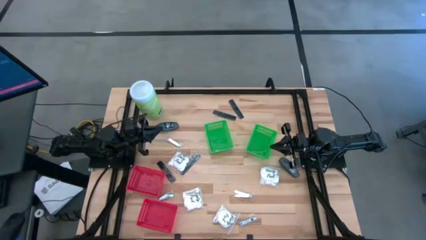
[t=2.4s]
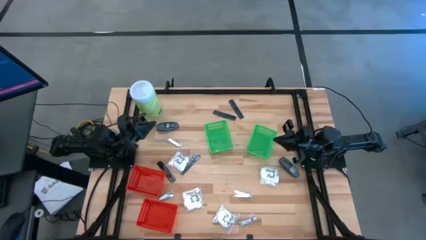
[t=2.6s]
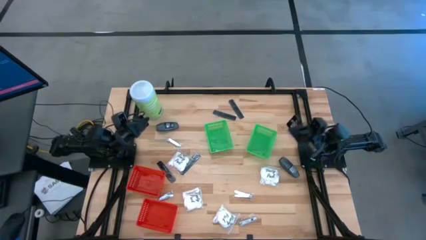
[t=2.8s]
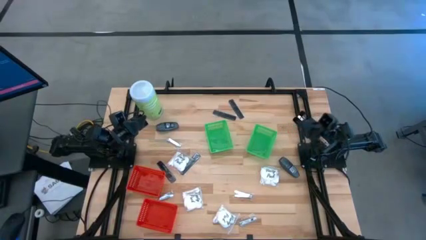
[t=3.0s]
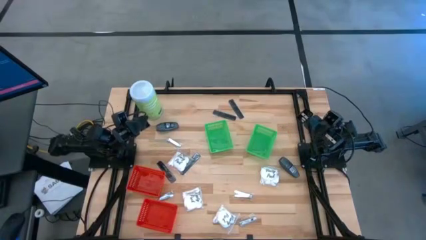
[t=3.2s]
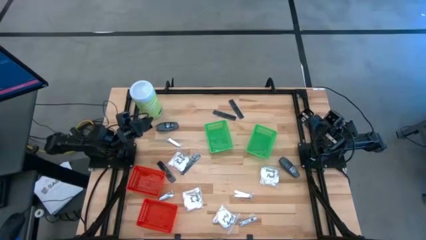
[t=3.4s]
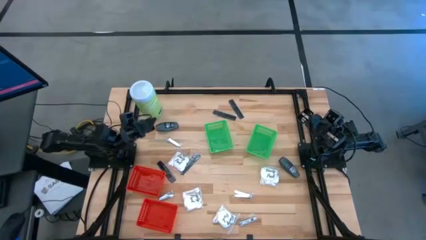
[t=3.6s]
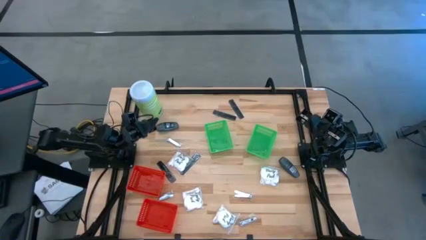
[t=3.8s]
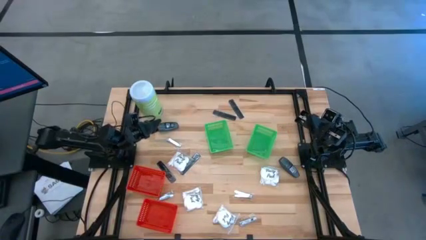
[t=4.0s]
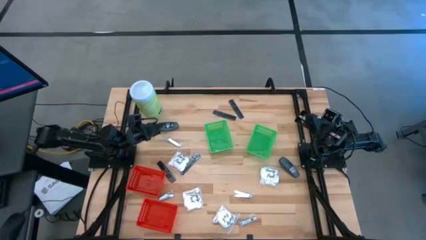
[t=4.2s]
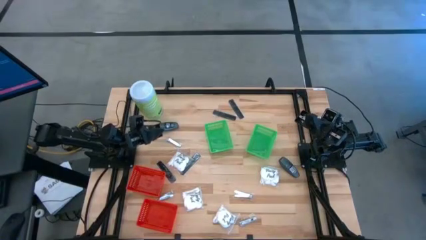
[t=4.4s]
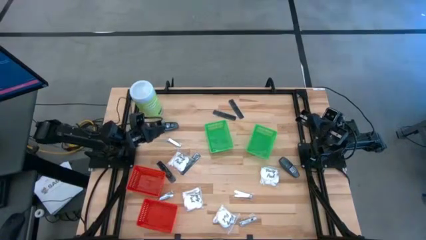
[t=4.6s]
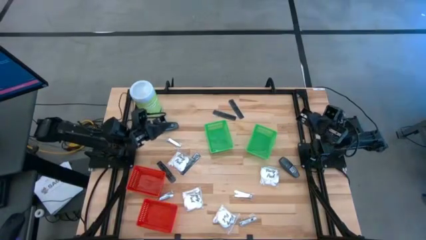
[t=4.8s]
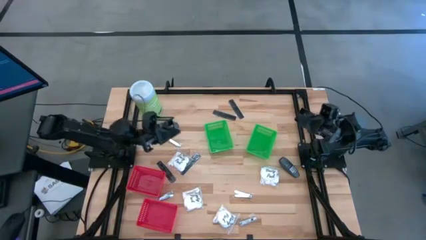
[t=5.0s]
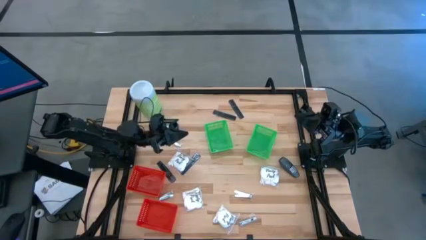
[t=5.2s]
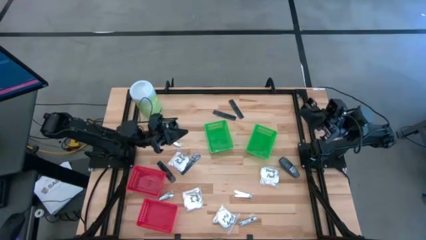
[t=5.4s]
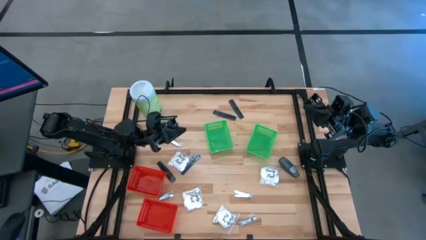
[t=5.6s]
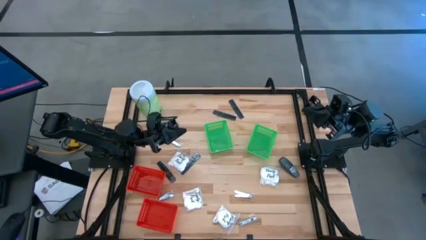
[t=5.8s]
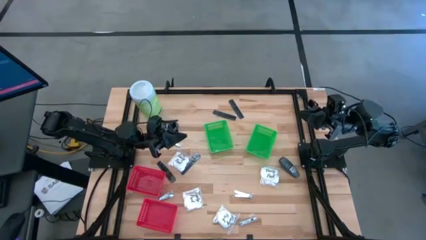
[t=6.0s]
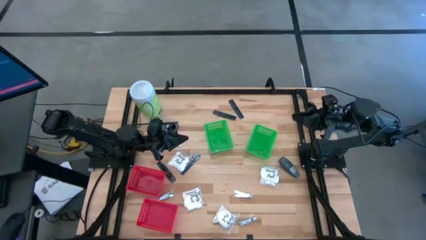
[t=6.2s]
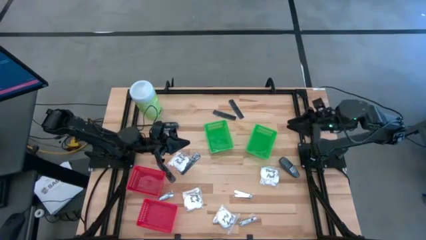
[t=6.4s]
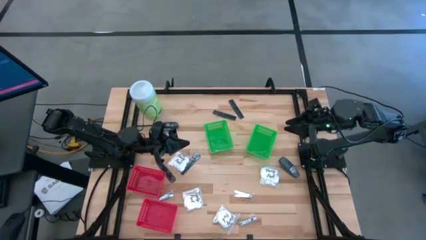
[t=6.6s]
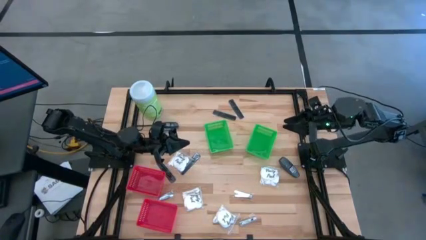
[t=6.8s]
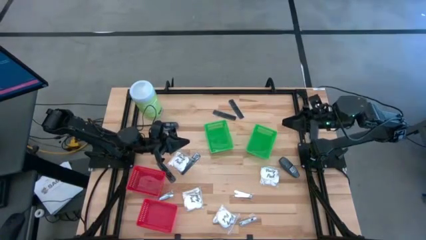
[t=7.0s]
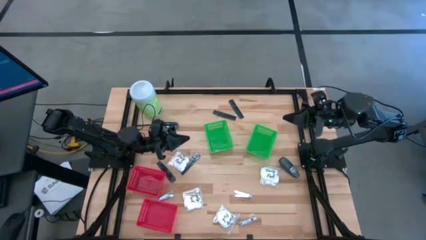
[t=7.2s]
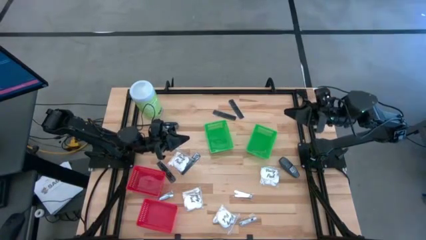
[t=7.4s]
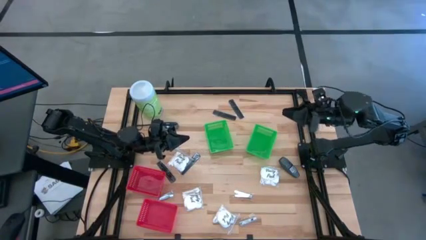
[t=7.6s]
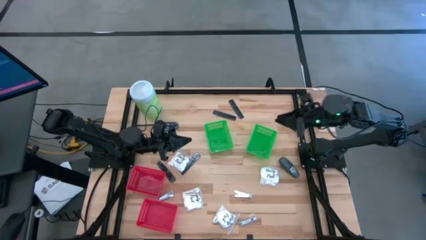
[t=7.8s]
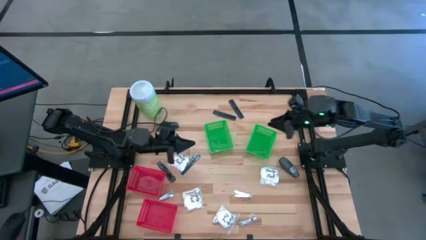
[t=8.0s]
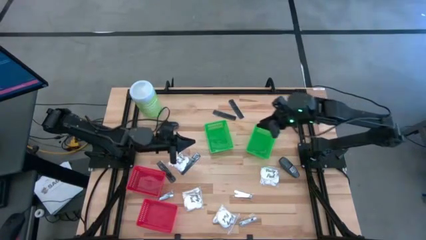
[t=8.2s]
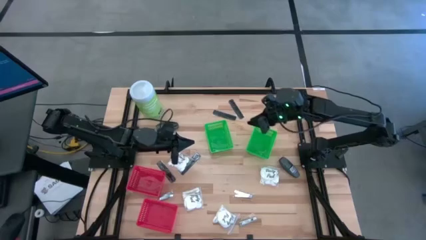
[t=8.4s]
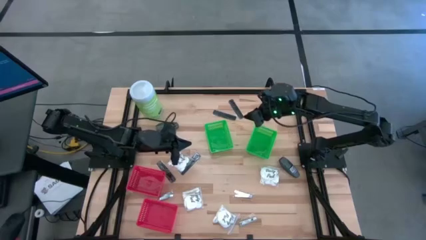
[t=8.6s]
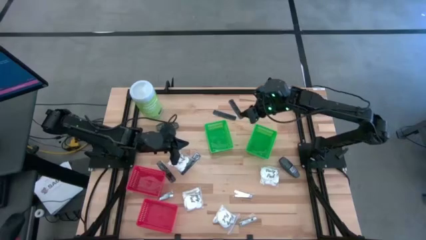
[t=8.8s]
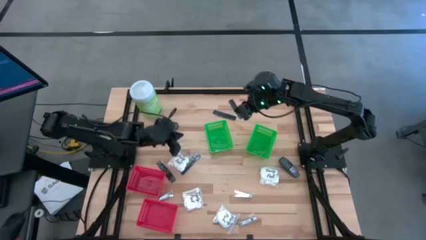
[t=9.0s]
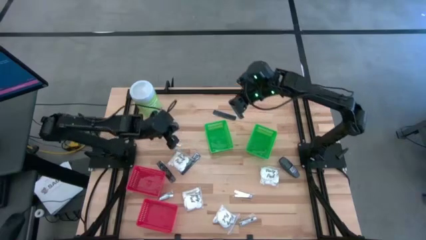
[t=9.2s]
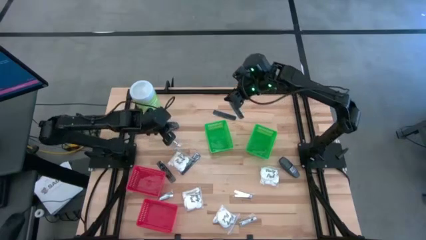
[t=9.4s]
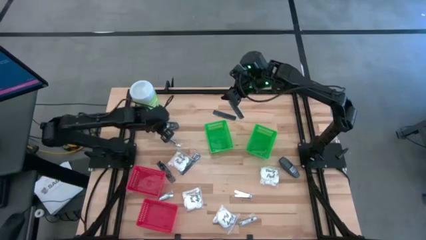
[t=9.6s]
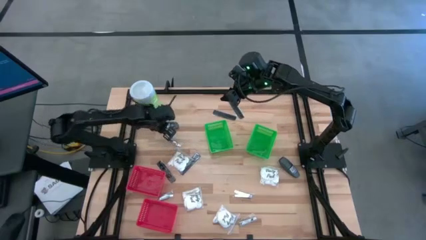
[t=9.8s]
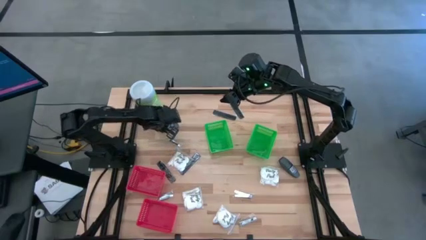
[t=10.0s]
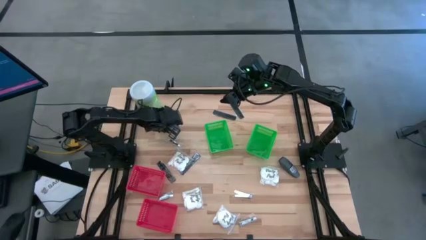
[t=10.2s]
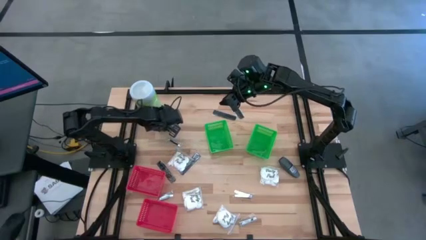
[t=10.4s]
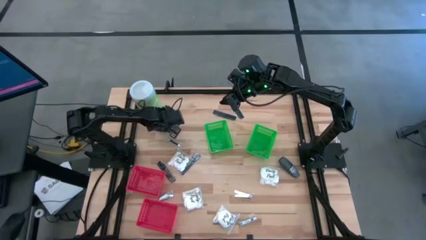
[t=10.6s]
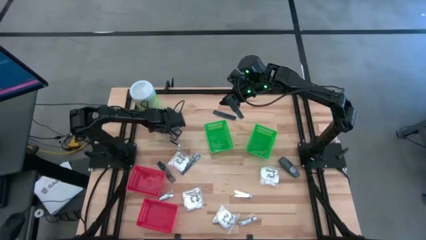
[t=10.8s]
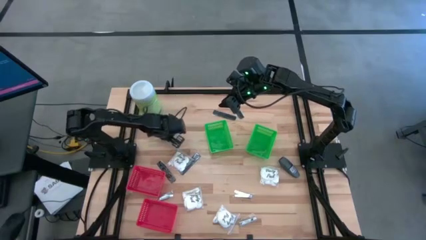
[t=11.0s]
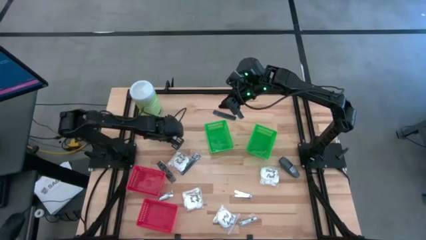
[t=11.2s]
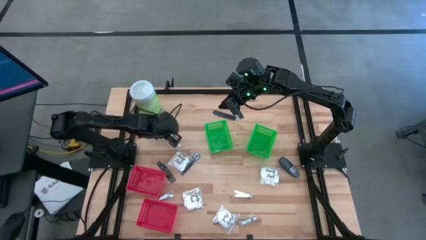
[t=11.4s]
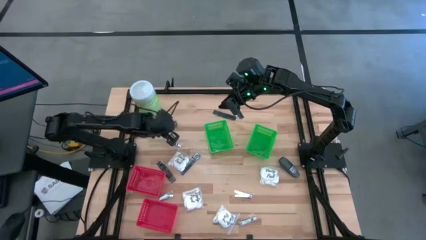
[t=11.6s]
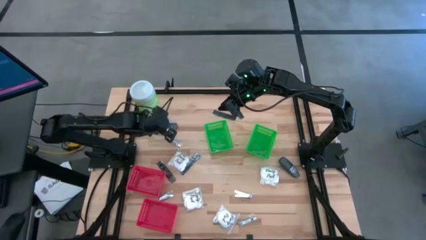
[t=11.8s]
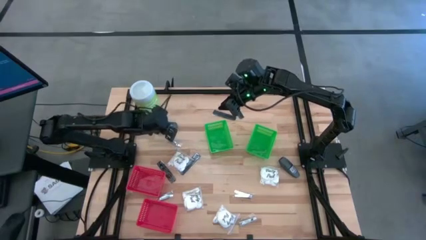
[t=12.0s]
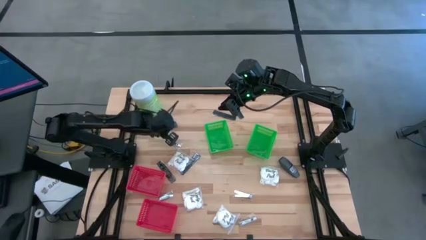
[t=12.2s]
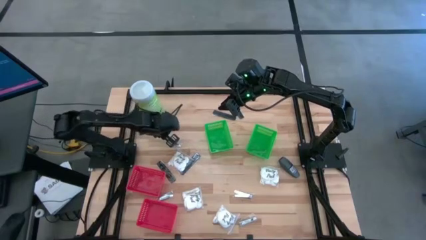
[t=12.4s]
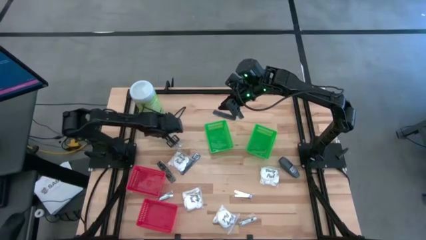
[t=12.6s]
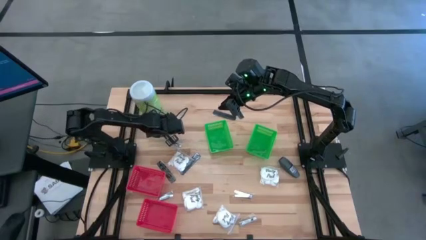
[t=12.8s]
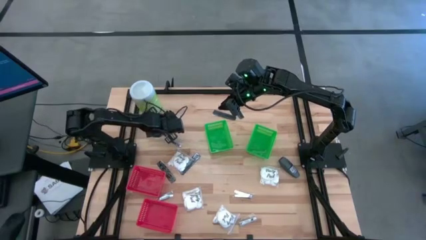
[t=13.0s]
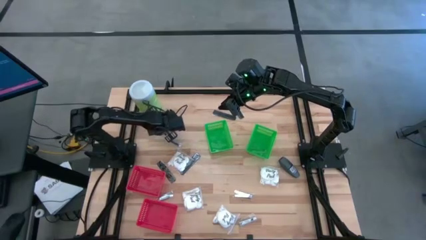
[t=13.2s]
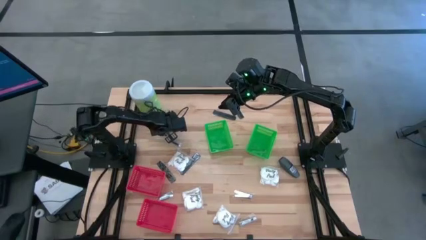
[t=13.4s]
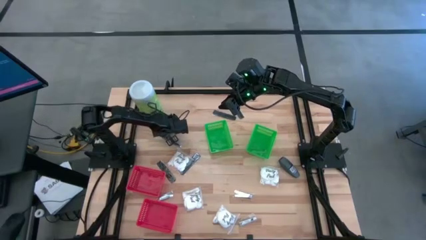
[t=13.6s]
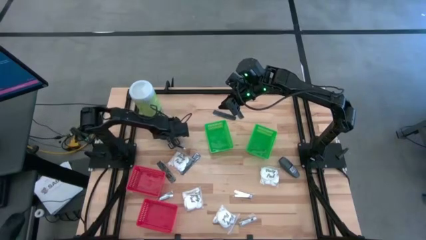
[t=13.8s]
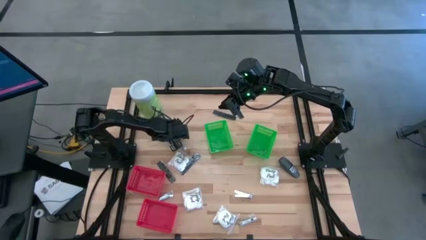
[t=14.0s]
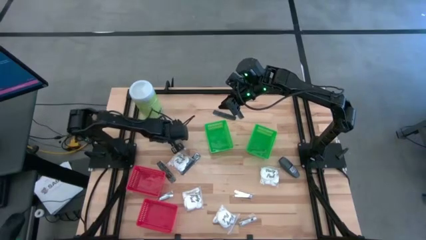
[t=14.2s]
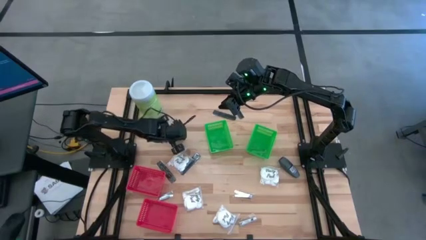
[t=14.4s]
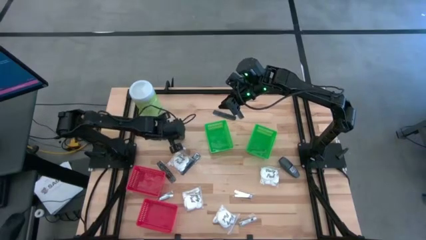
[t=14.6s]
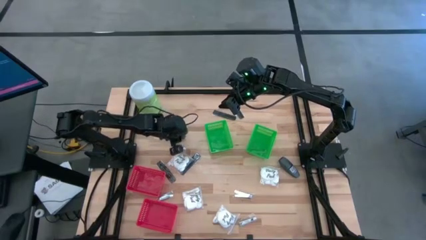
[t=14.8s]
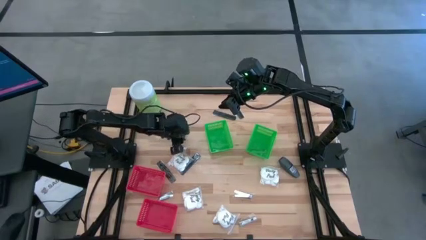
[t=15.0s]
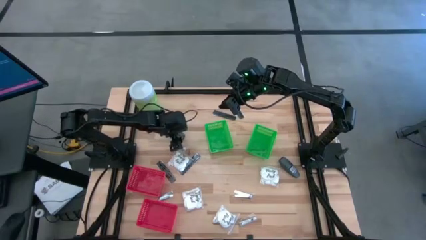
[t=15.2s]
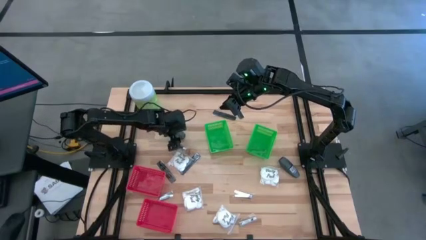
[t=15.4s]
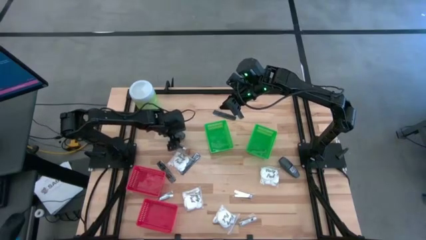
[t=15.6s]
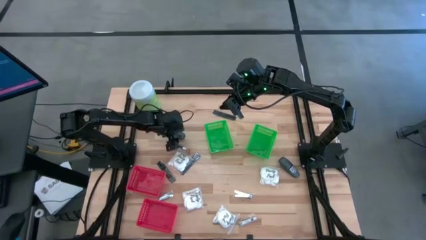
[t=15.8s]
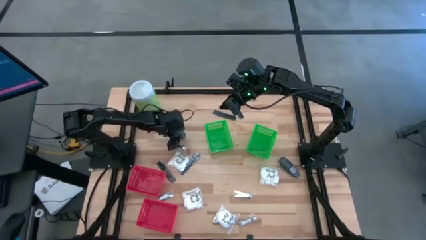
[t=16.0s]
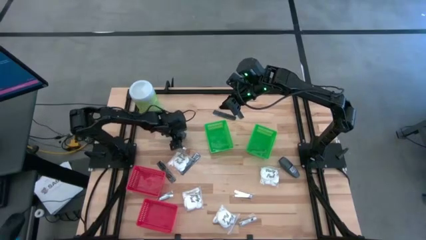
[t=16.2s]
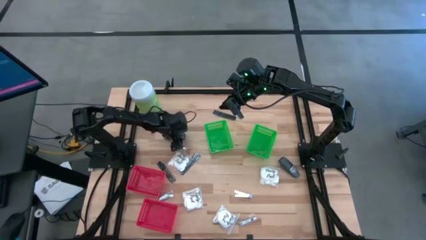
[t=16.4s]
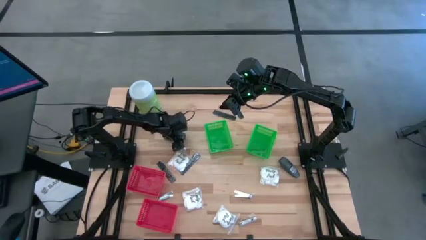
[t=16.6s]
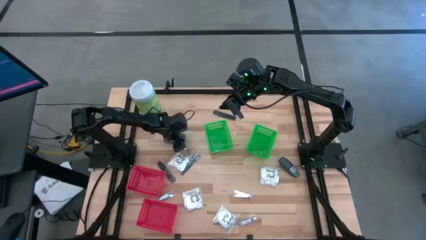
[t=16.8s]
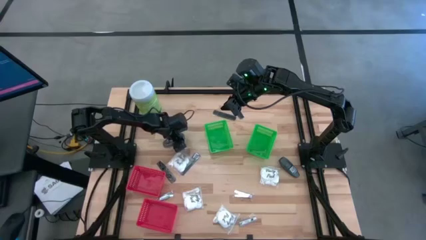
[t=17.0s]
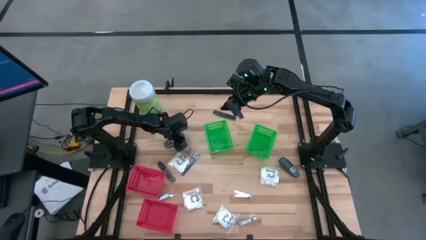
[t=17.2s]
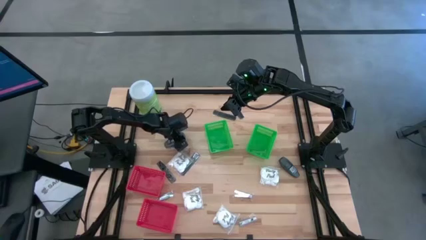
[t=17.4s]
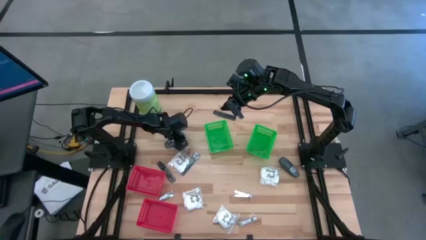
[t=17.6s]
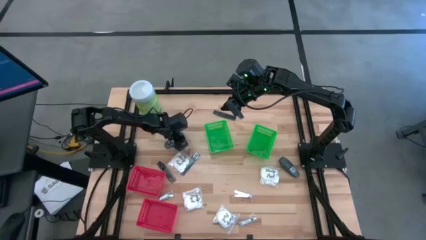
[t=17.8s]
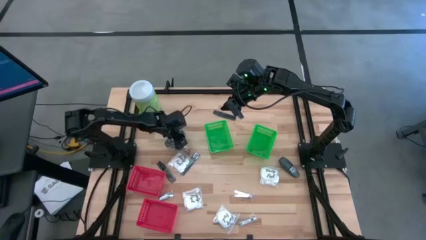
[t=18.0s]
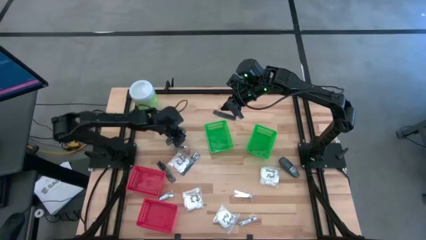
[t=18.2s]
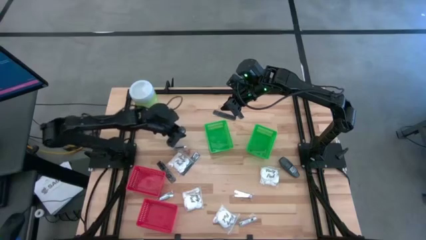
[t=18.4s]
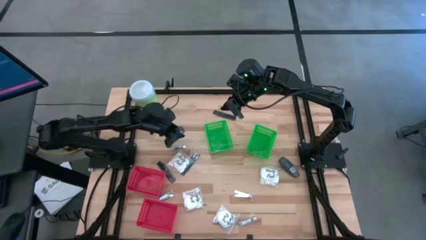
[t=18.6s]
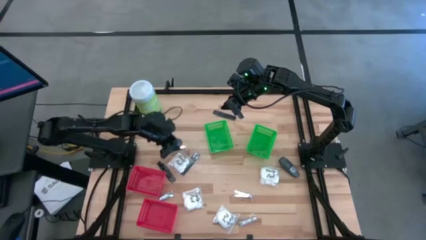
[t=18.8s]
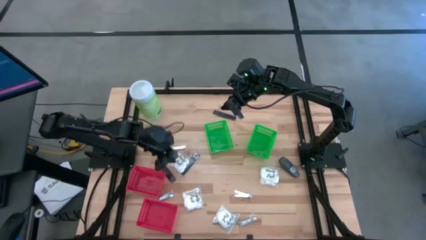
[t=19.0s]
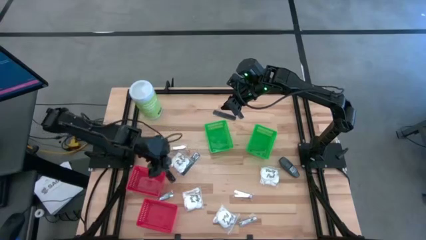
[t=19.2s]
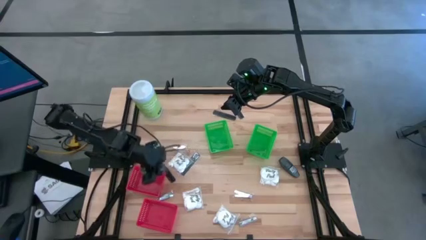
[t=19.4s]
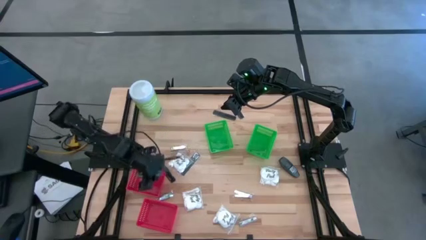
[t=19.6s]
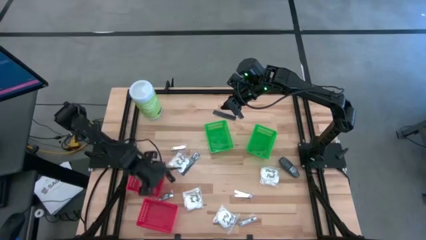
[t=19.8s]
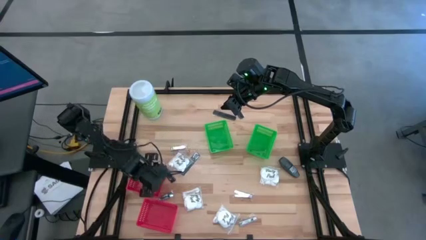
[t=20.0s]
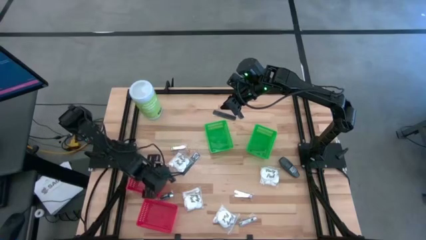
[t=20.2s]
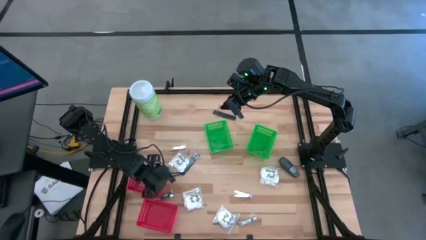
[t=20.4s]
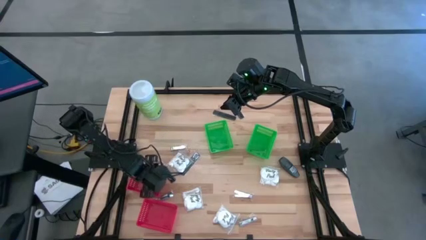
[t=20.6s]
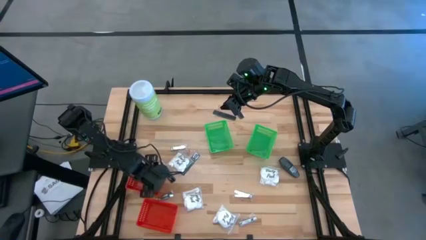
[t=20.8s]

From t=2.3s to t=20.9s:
Task: Pick & Place Travel size toiletries
Put the top black deodorant into the top red basket
